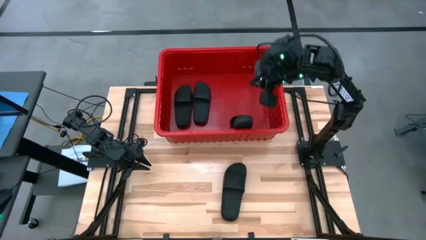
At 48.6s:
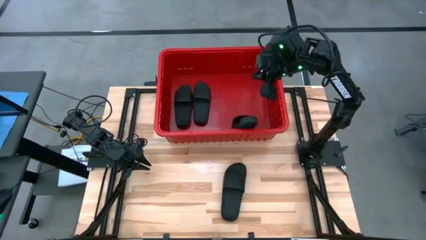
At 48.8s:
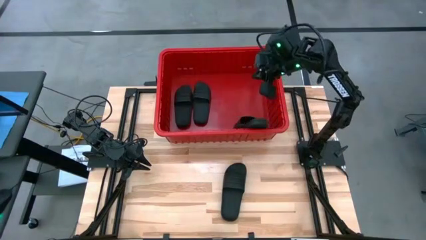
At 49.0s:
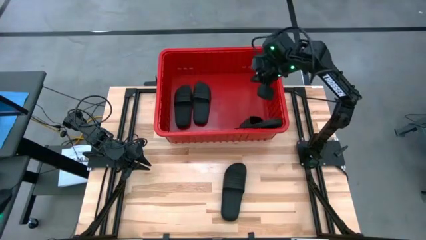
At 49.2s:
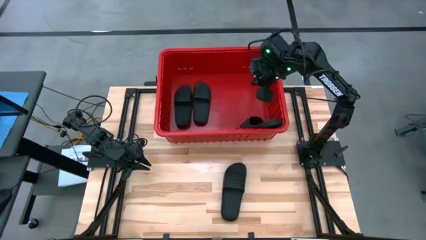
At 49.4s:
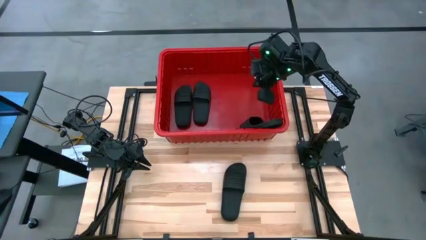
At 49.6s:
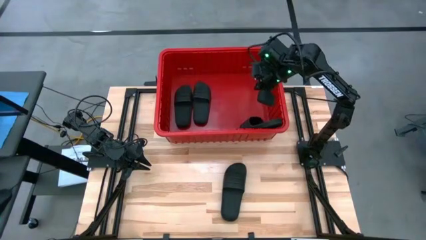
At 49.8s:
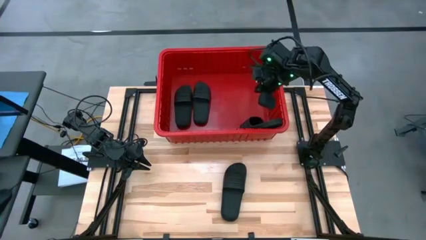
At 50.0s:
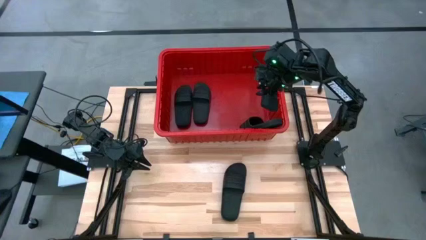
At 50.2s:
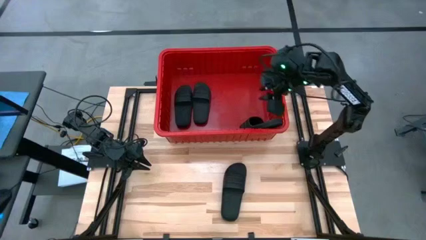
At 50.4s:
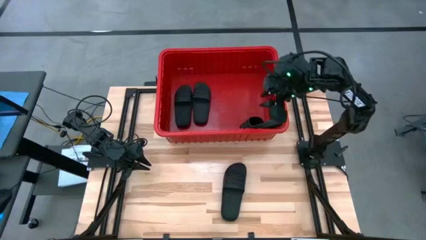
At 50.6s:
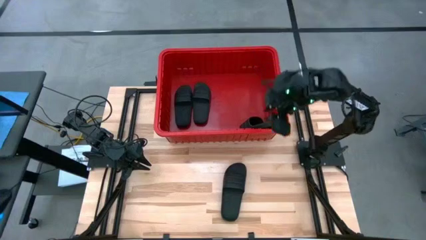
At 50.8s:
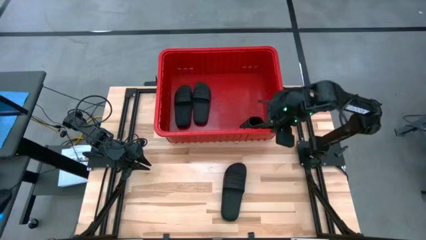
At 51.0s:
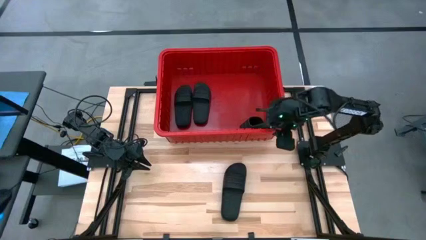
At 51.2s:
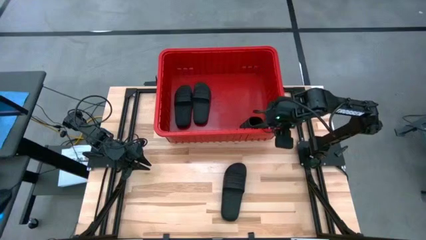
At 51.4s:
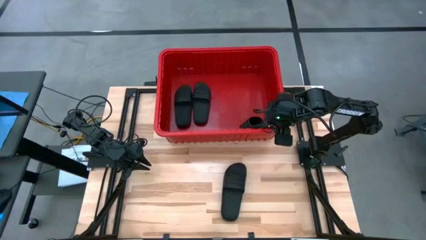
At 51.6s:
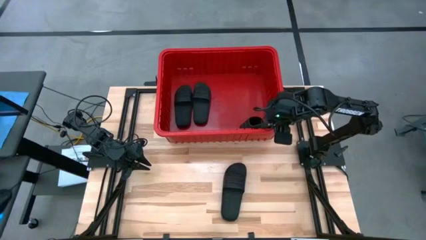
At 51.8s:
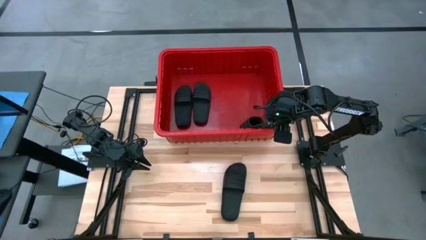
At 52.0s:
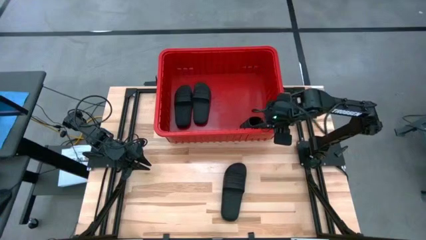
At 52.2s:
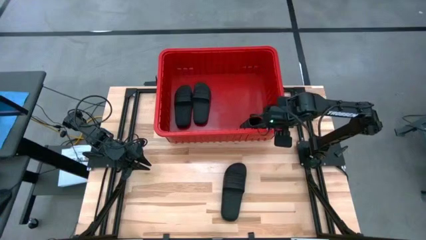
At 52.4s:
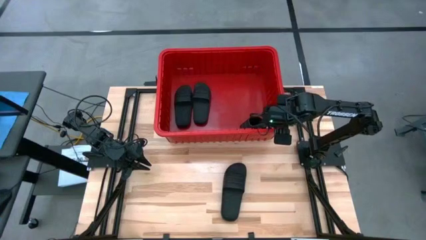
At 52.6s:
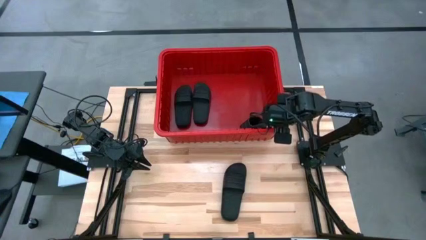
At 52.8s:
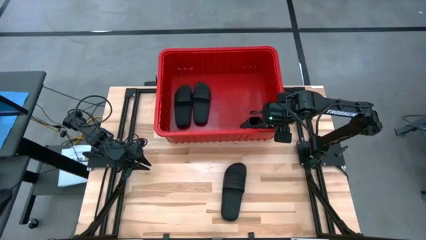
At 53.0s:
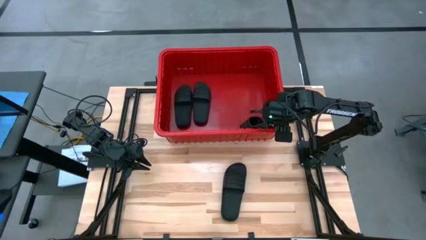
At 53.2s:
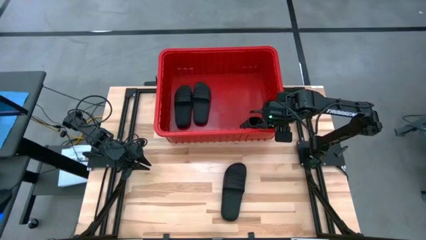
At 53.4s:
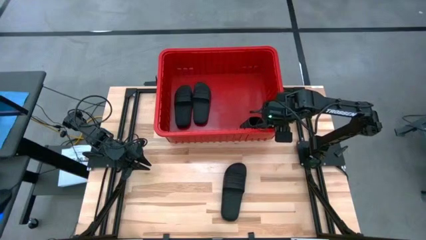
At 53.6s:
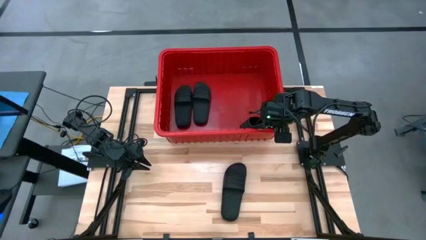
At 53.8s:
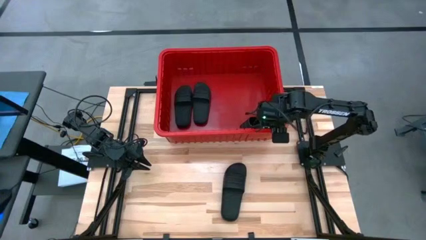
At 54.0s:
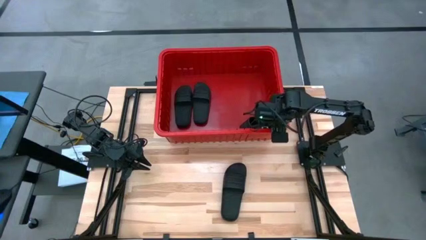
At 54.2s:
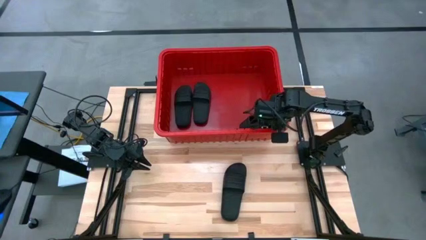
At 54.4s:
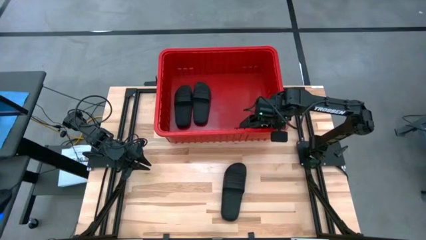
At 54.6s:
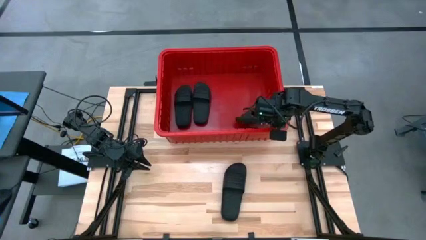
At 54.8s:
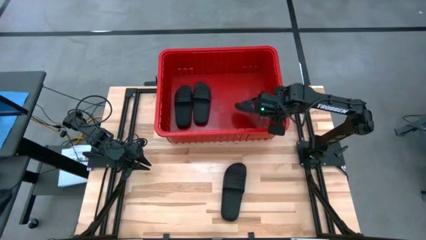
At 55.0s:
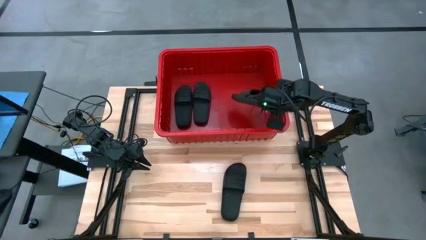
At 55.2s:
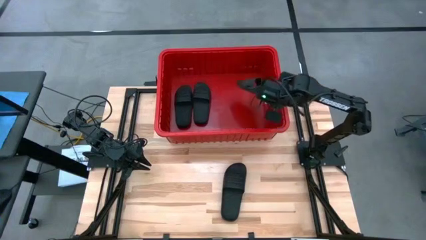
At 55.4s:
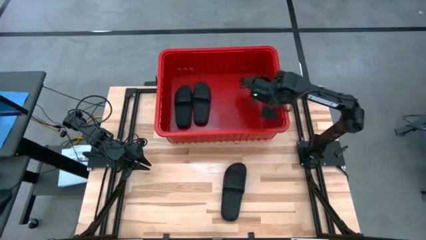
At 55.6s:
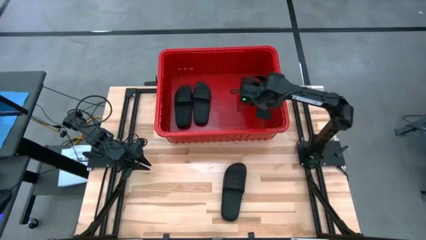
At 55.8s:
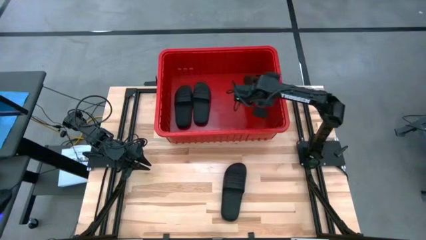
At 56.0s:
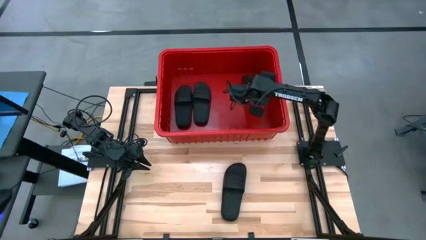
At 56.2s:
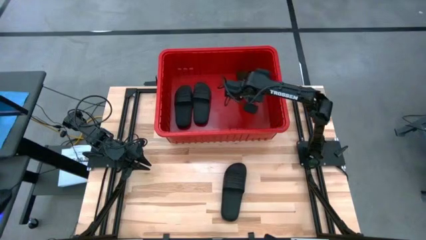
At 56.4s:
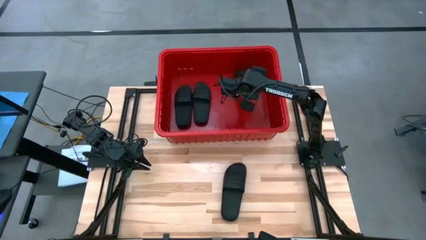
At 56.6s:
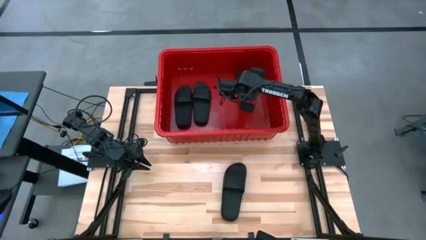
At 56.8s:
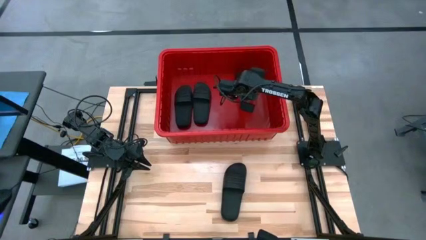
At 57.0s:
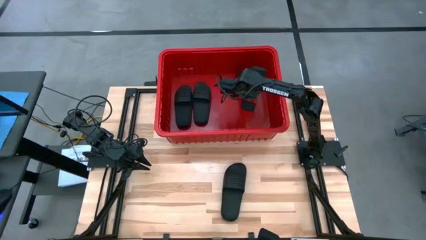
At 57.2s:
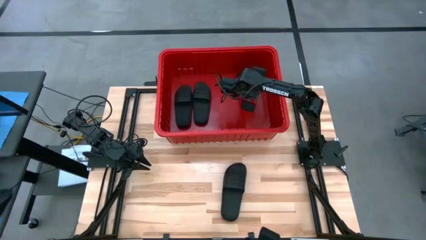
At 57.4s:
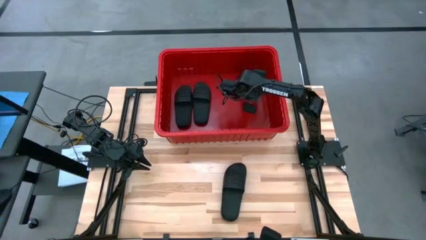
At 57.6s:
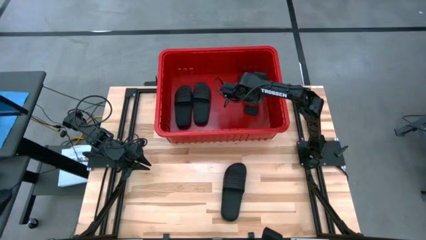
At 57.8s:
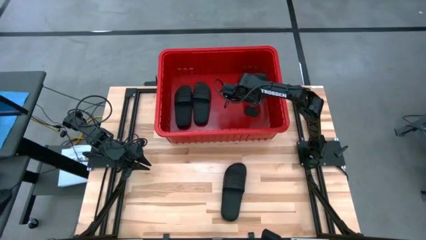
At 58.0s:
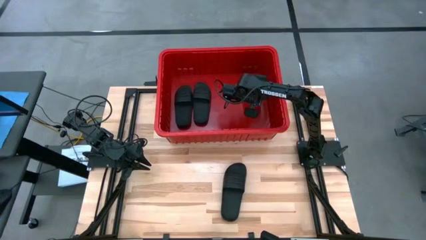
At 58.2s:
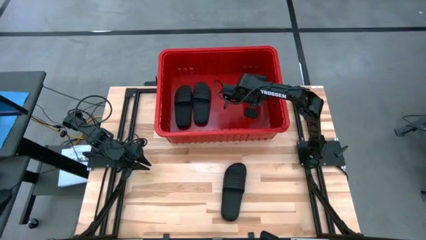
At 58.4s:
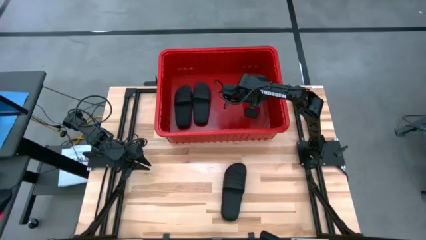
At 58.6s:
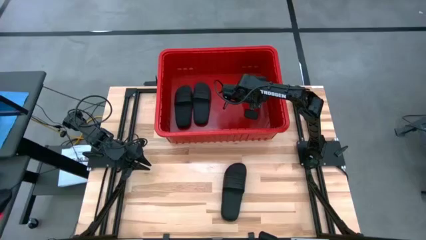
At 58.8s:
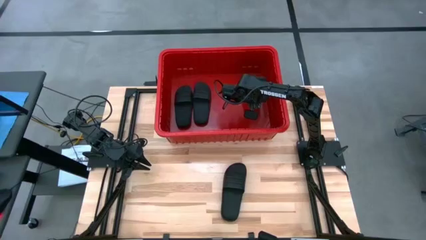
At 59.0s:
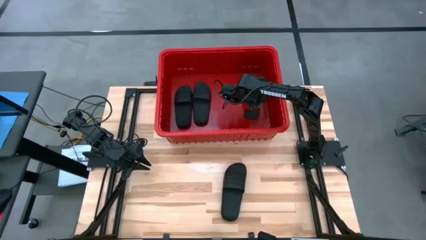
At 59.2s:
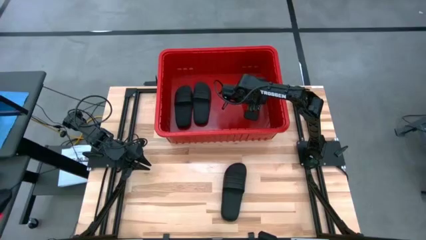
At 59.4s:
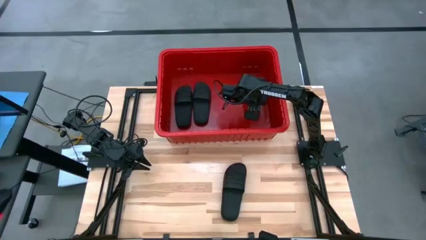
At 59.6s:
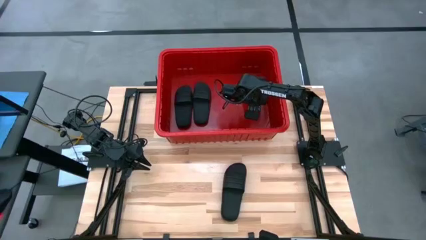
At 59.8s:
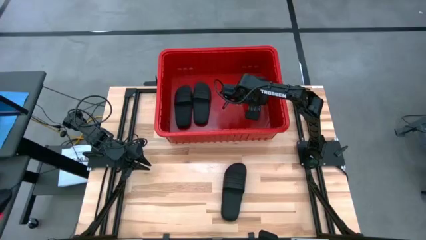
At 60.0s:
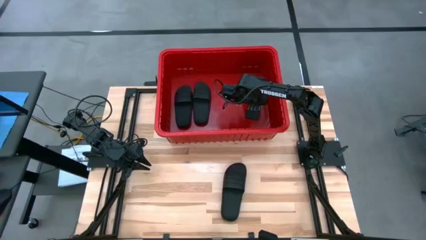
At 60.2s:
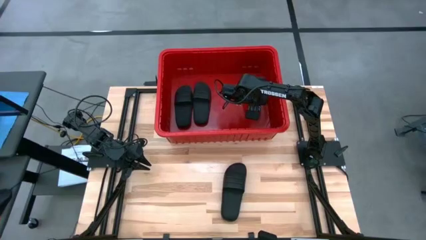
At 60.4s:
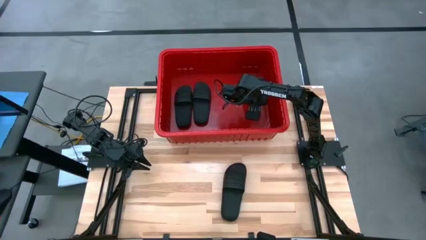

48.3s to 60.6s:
Task: Pick and place slides into bin
Put the black slides into the red box

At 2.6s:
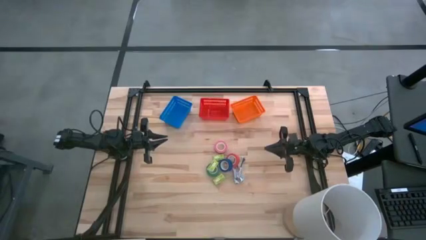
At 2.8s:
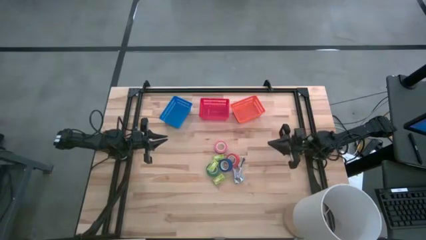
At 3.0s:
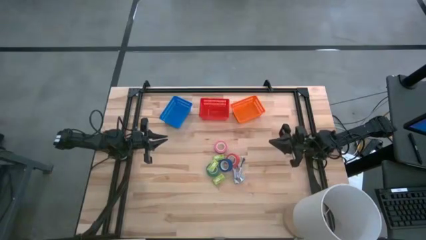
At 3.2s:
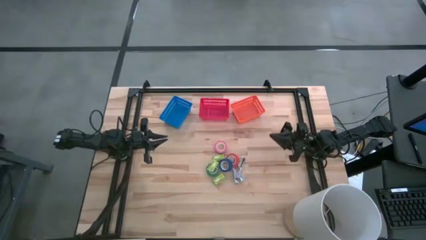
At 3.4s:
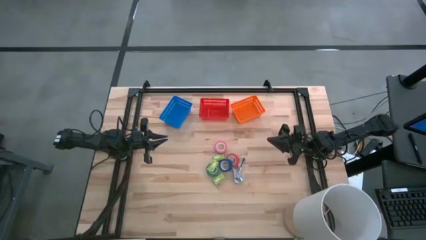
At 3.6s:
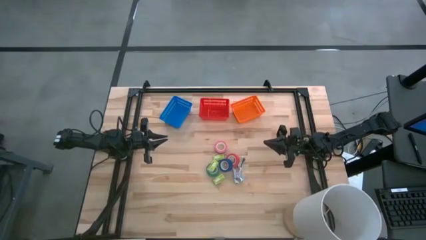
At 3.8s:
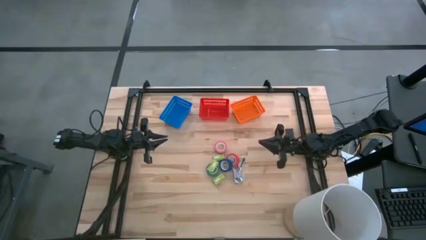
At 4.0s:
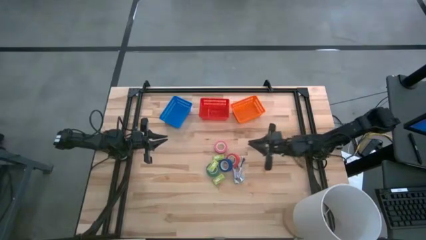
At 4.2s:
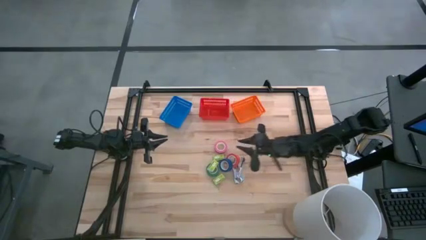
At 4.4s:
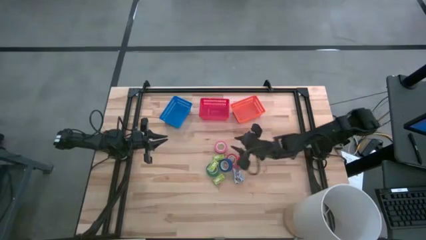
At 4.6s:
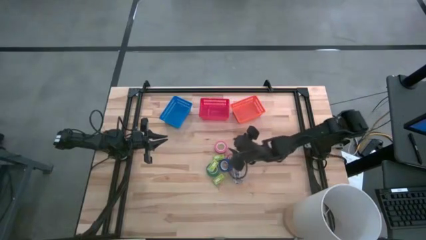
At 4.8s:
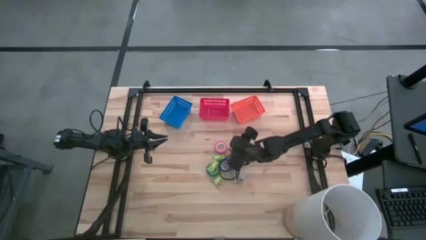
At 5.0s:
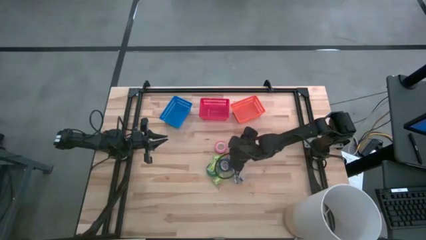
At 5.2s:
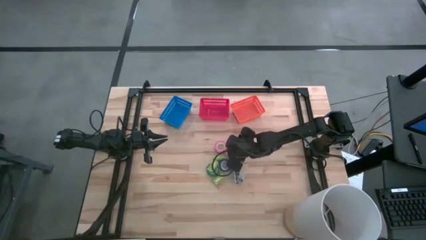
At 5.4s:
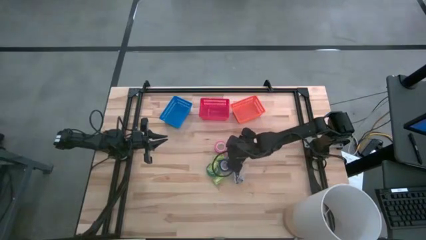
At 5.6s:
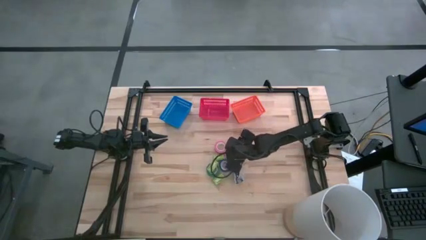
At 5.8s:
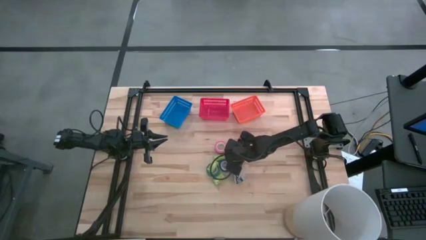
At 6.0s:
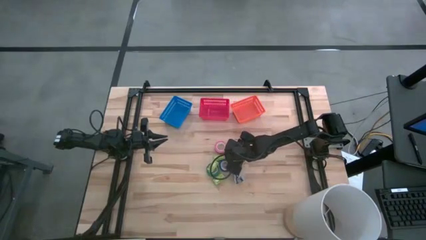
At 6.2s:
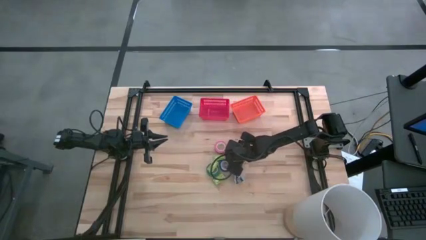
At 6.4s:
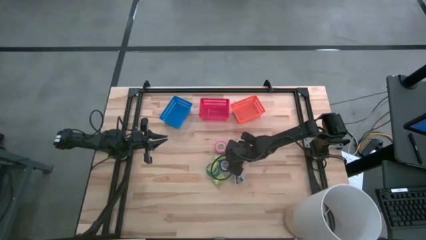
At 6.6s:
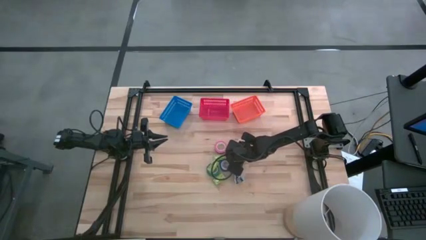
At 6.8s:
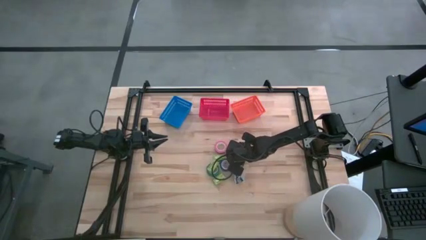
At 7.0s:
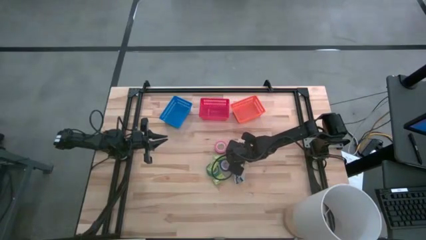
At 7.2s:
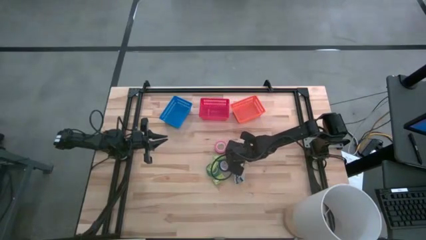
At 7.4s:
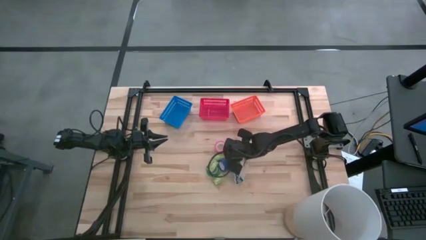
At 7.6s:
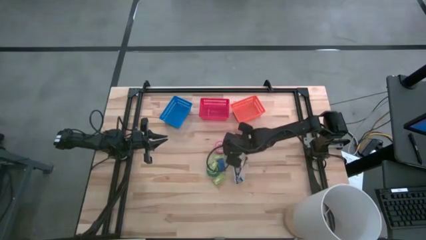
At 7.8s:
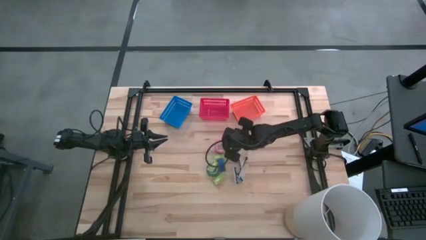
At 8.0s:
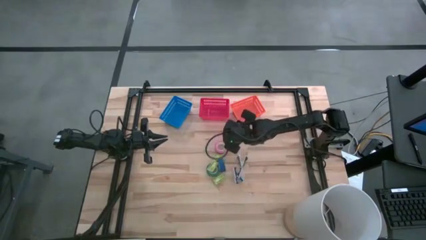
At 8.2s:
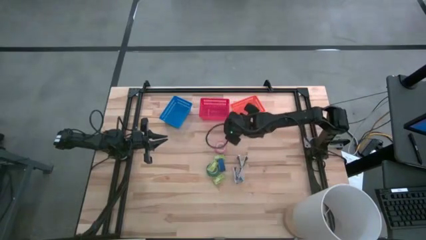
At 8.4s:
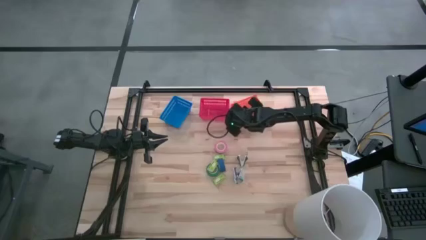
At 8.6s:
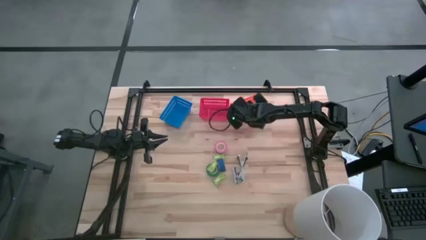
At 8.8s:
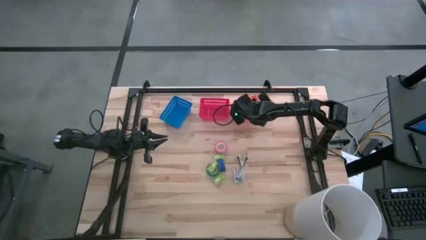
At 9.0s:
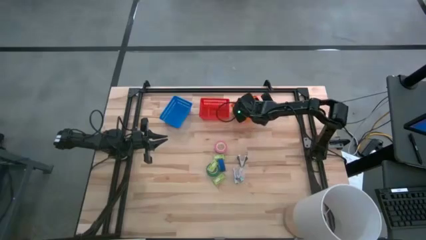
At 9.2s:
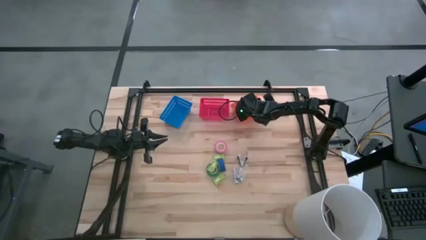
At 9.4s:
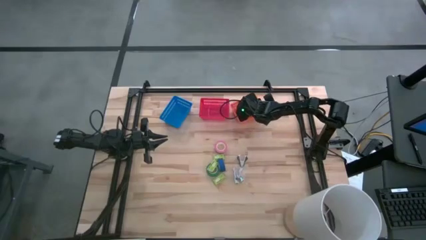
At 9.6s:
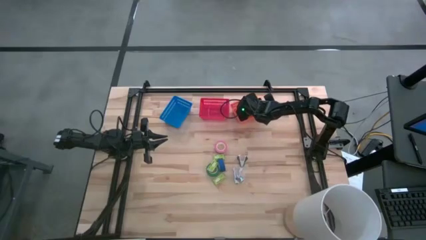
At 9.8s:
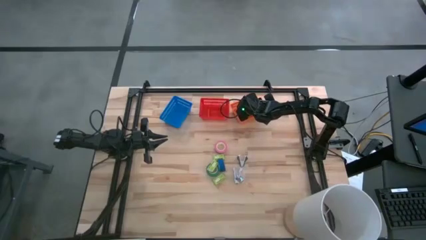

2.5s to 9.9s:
Task: Pick and place Stapler, Stapler remover, tape
Put the orange tape into the orange bin
